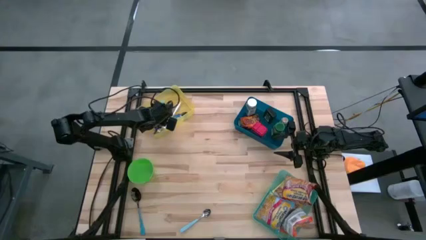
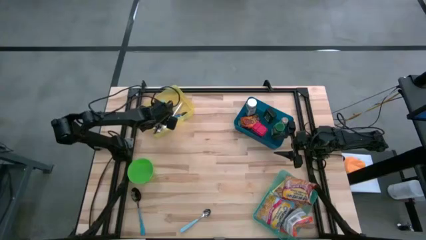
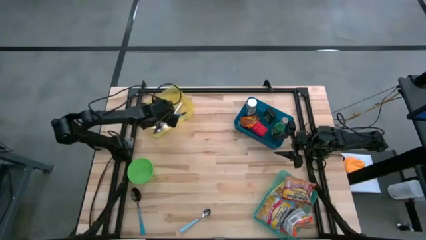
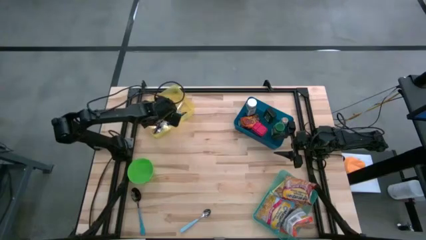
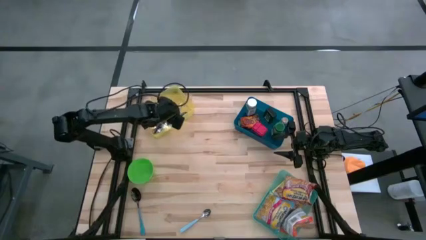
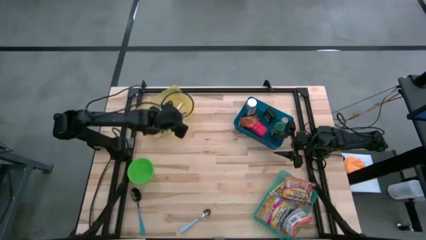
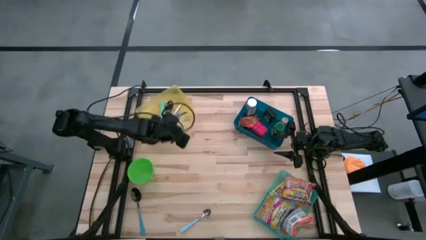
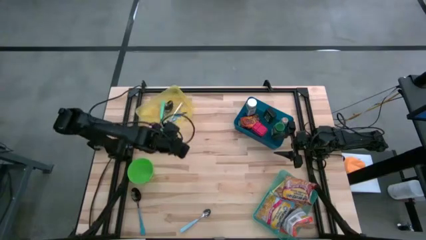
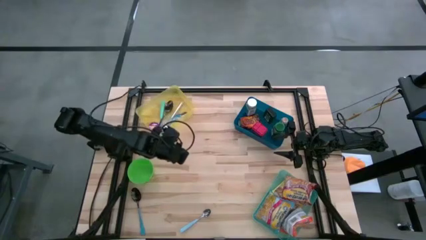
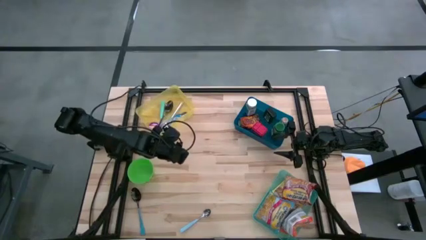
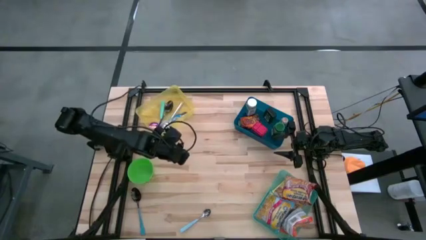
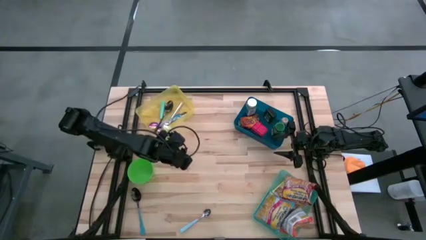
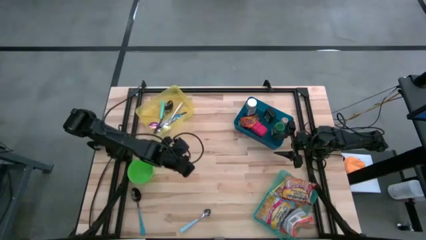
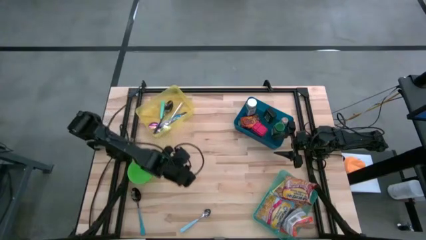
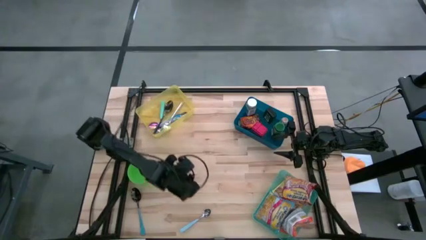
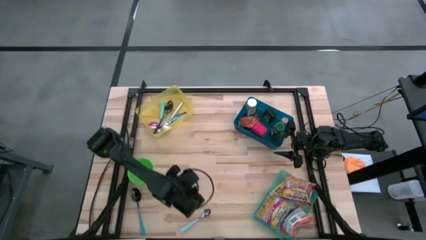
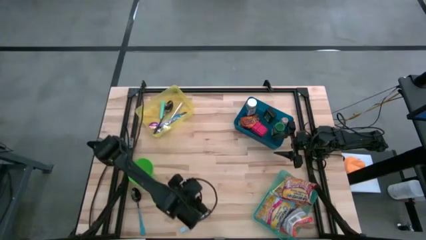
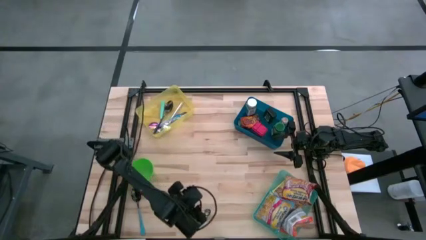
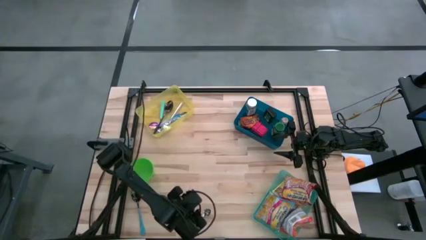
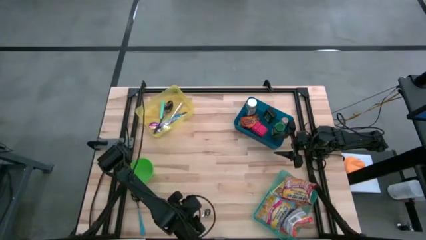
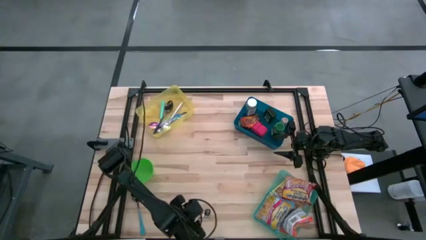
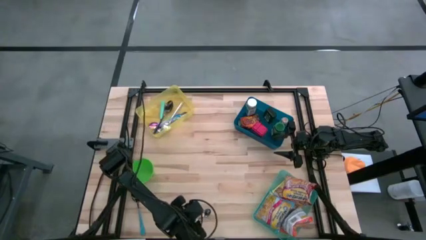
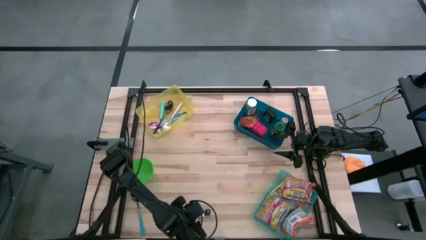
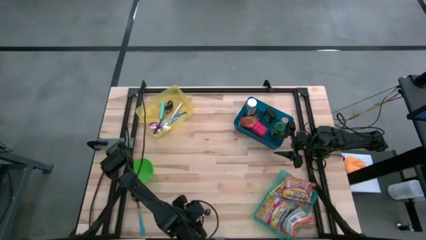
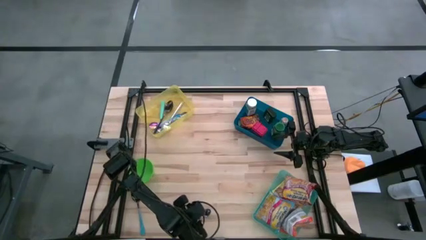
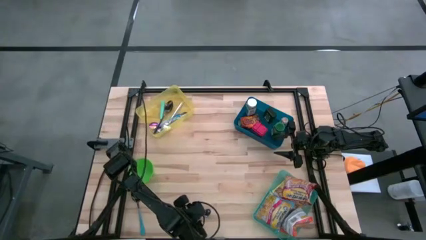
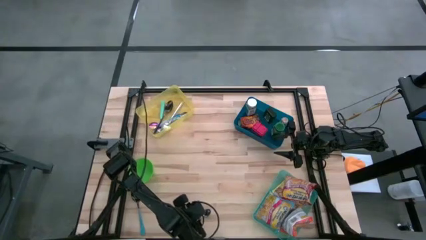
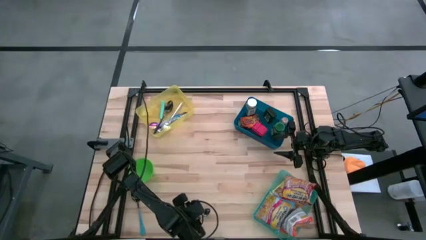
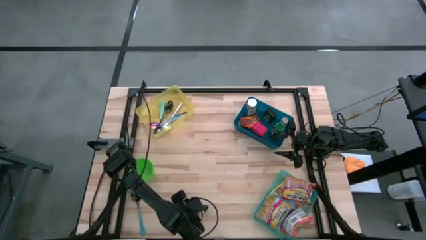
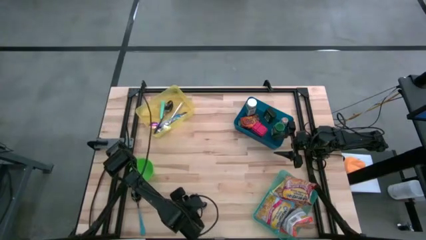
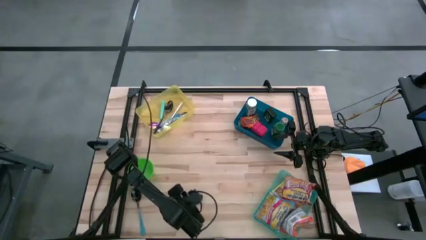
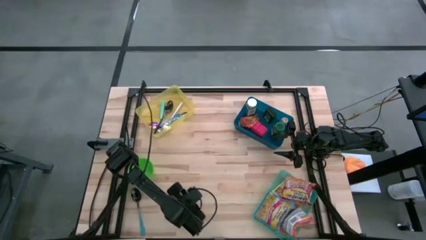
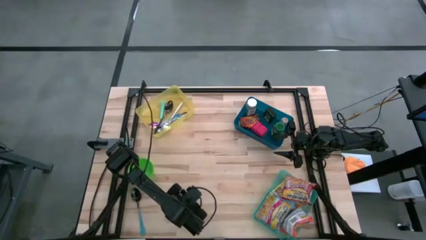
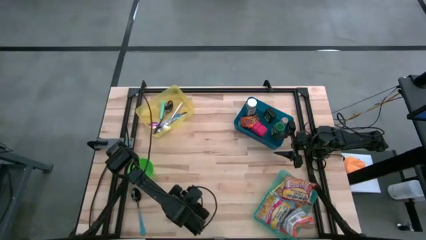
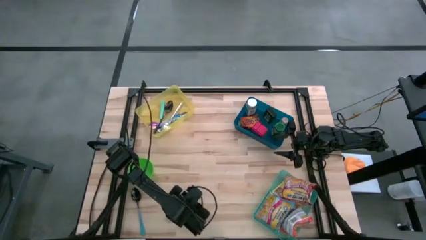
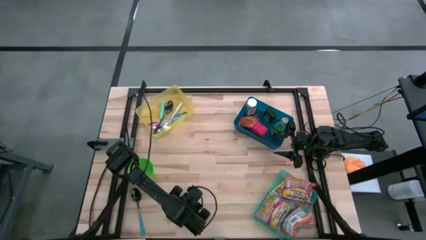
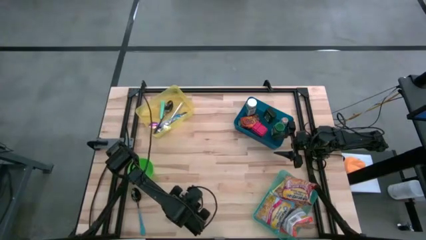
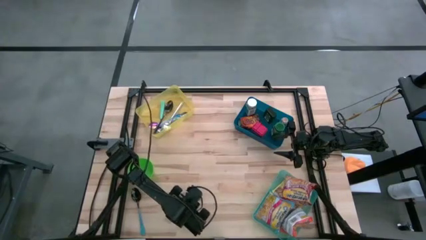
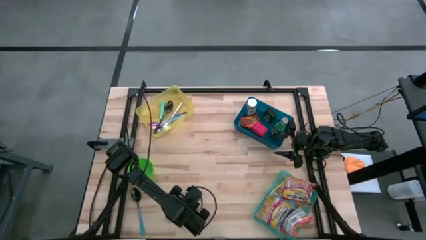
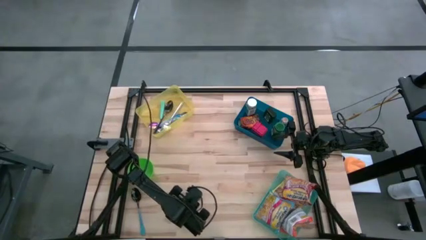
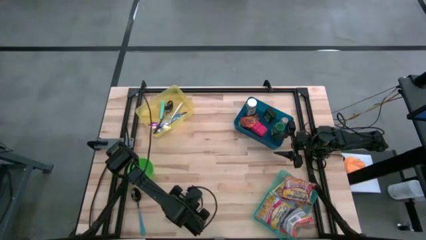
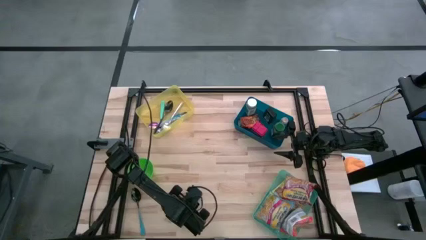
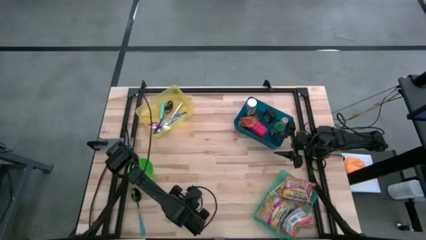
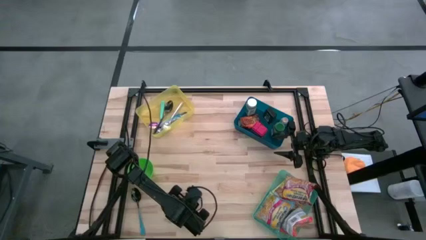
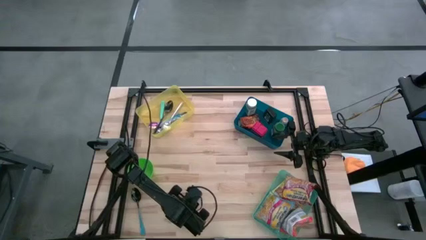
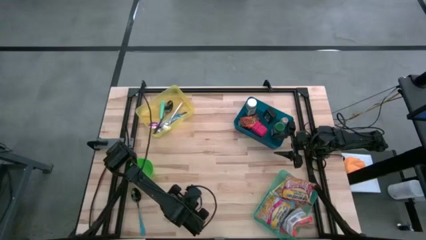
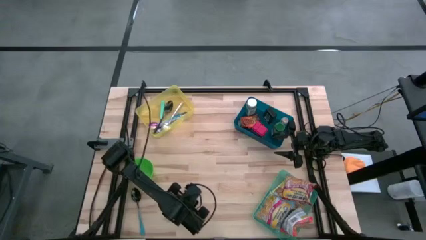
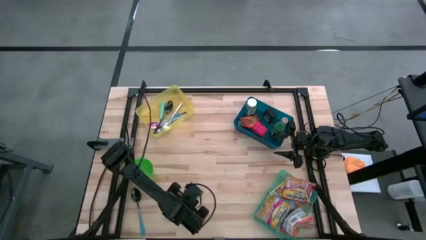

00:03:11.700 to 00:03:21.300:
Put the blue spoon into the yellow bin

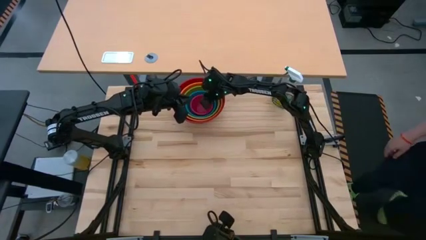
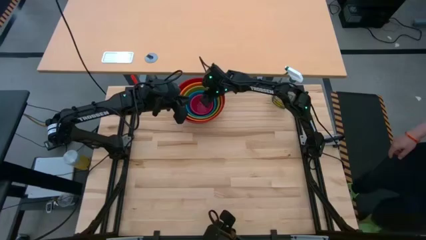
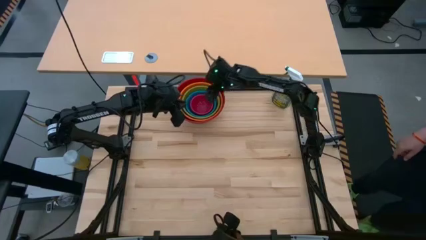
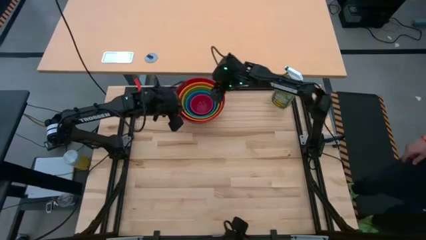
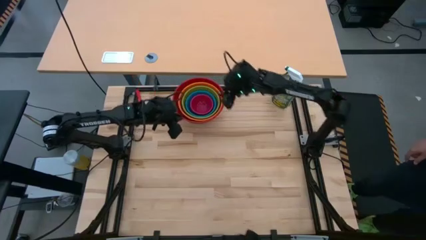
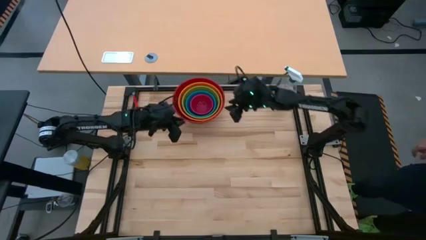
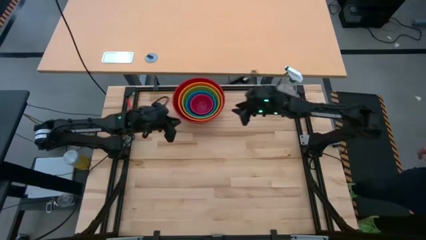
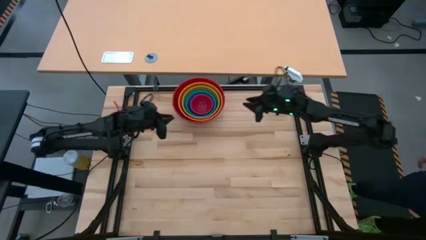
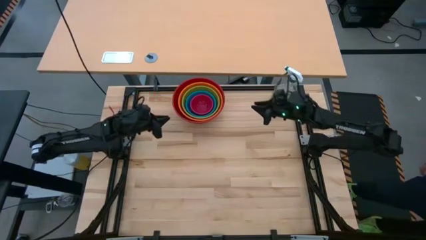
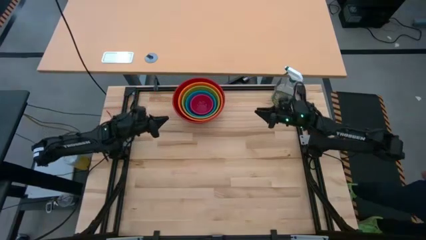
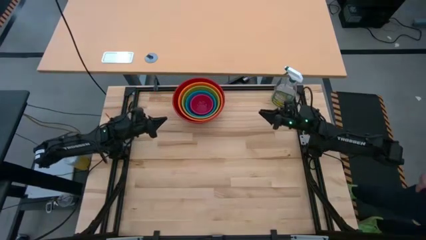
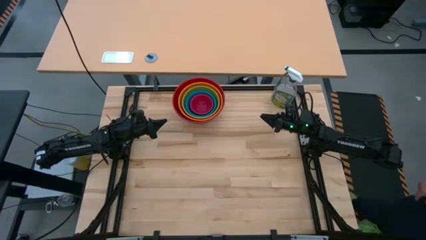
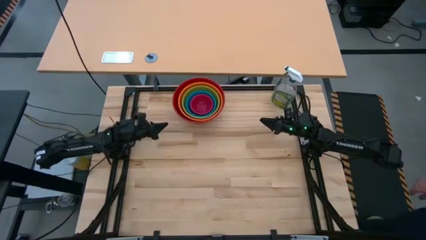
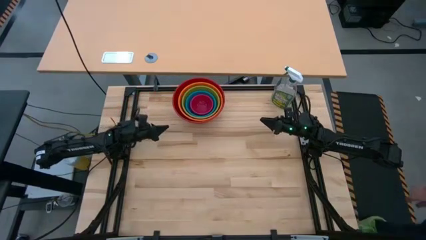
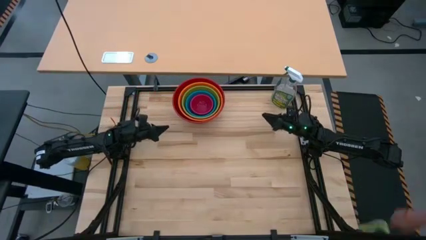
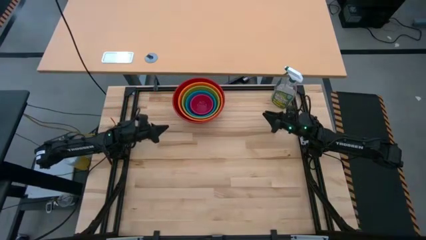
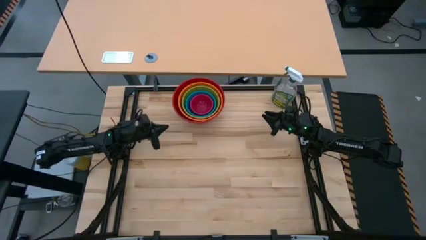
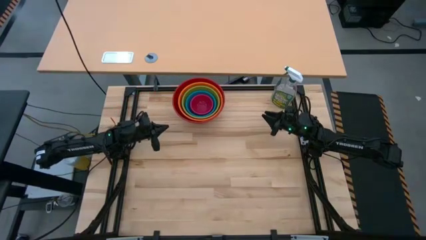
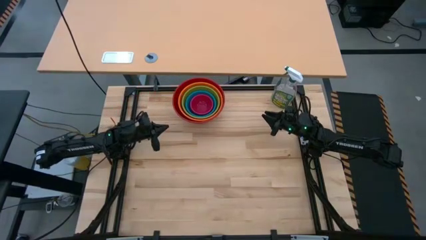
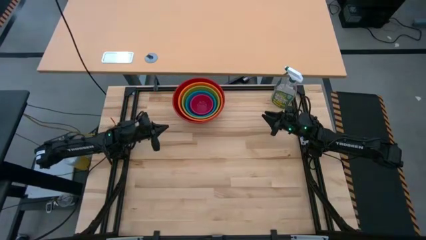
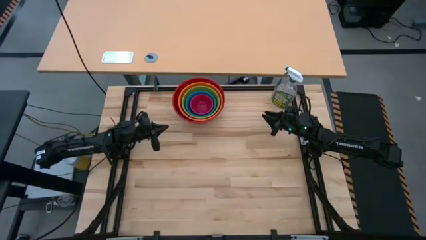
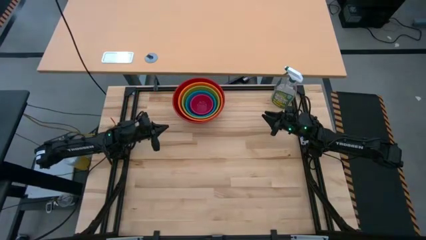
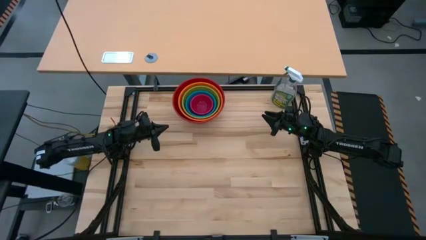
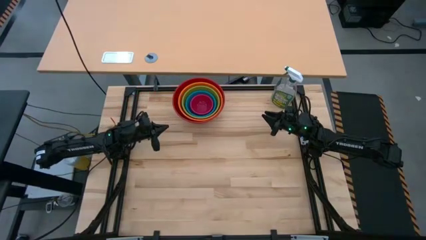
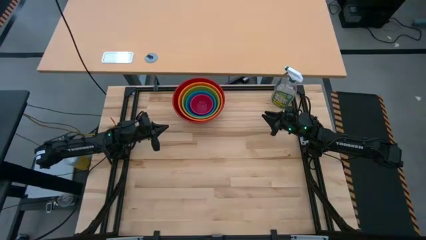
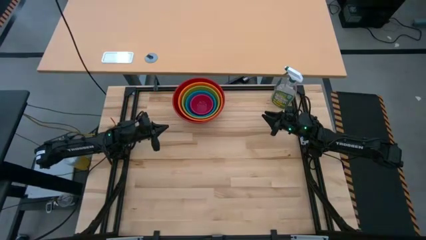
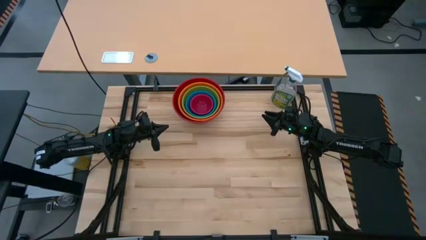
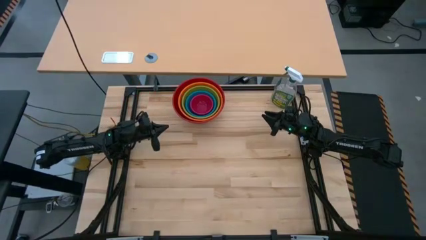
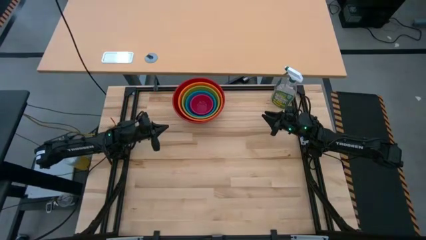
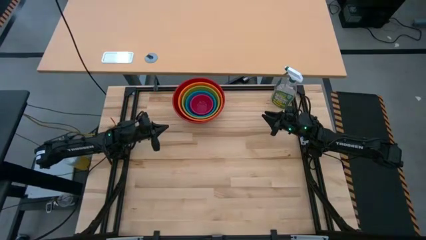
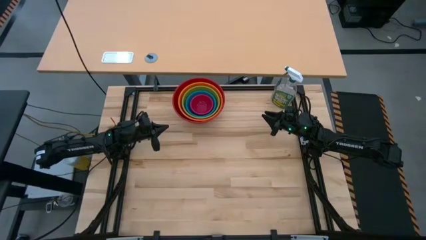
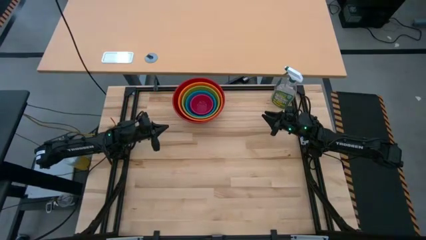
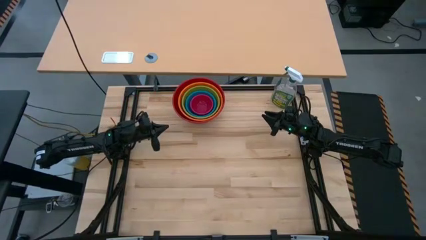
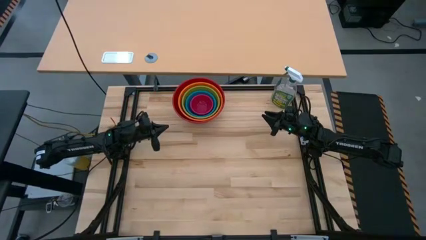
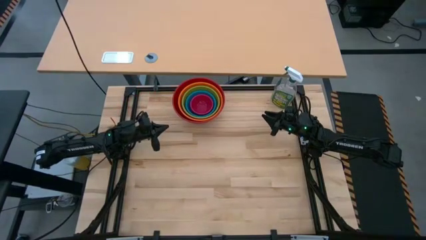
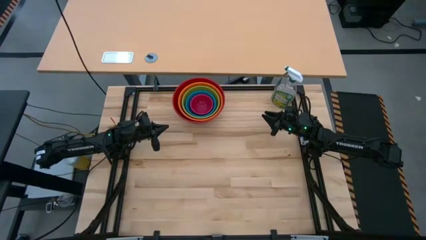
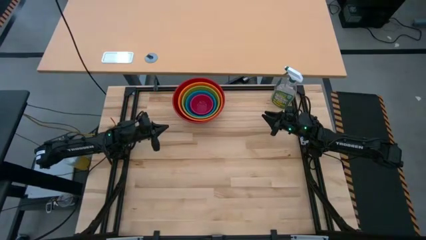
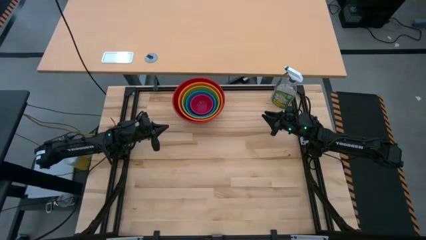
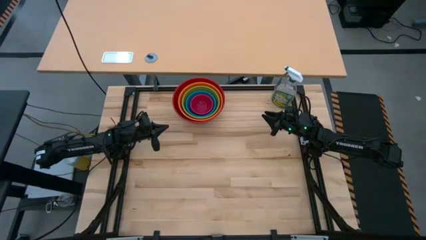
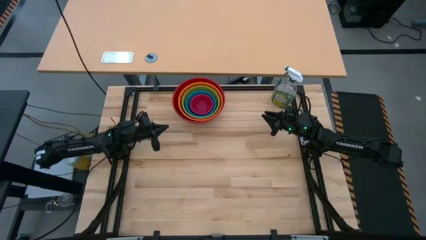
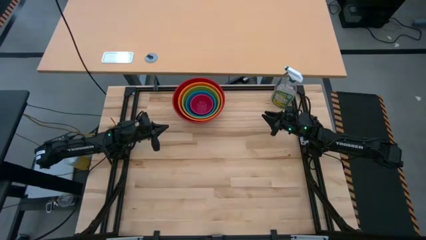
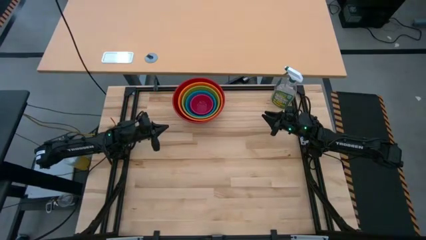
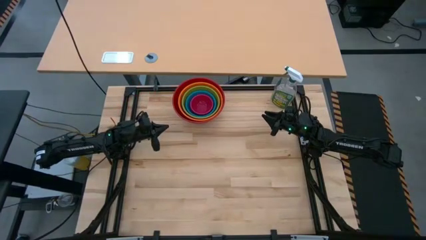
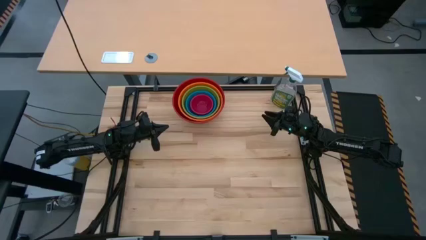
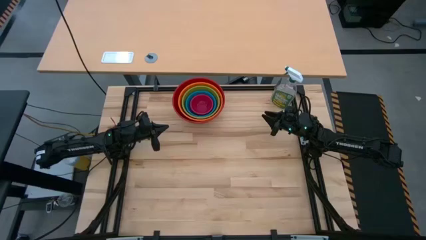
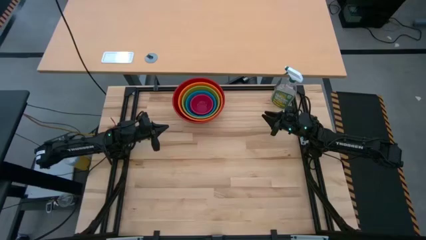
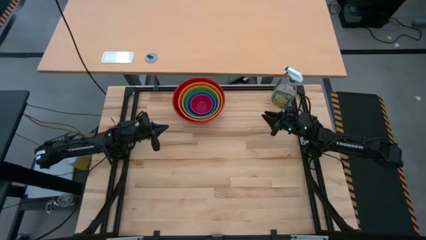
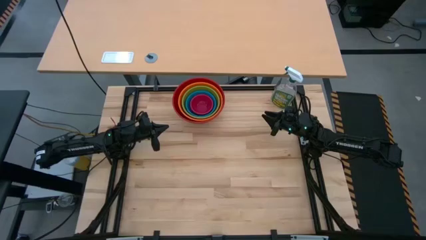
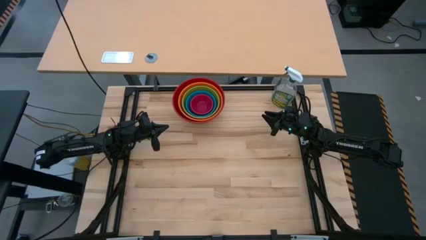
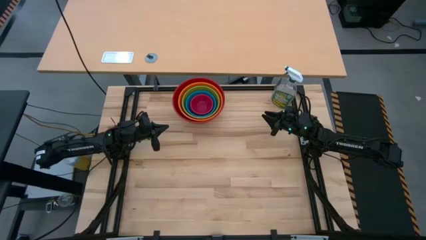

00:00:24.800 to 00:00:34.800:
Return to Home Position
